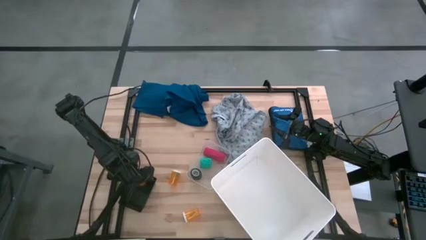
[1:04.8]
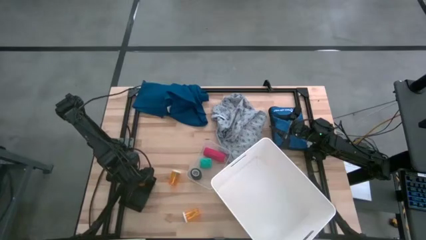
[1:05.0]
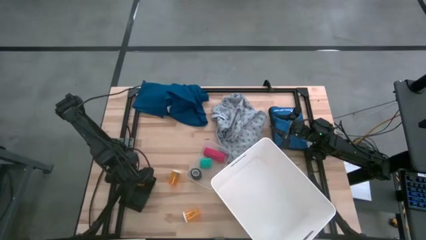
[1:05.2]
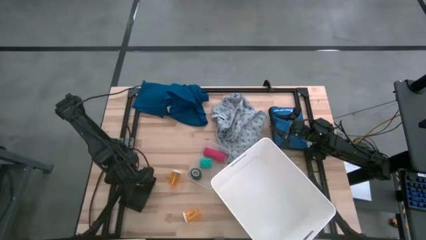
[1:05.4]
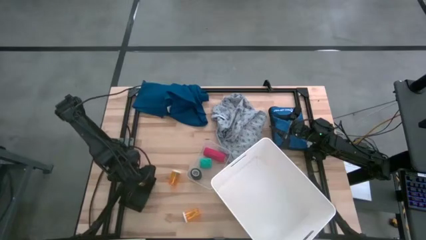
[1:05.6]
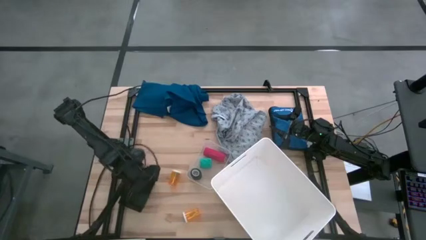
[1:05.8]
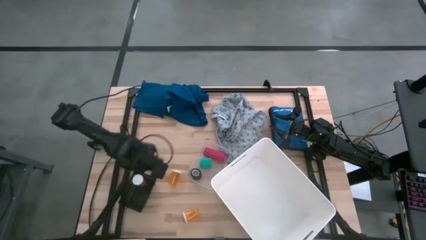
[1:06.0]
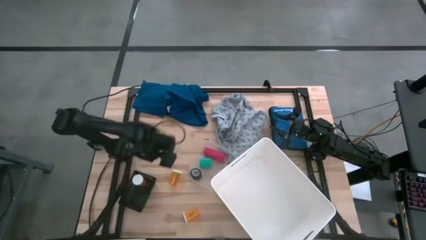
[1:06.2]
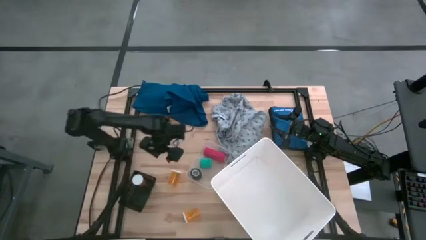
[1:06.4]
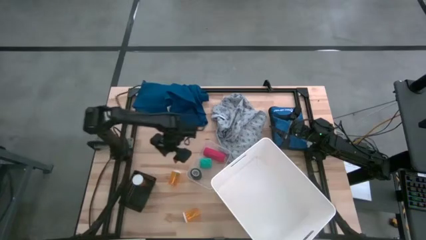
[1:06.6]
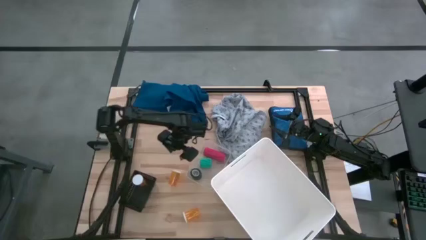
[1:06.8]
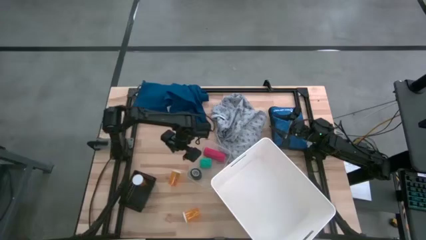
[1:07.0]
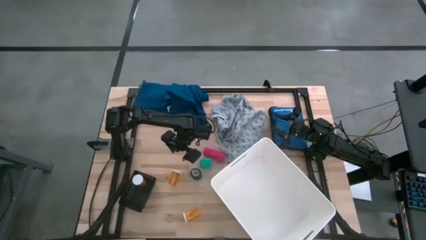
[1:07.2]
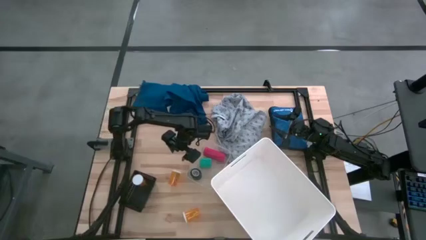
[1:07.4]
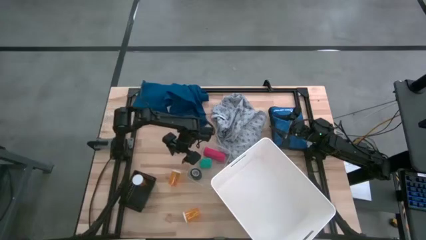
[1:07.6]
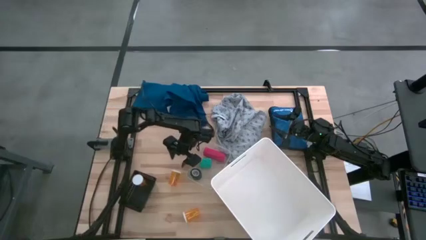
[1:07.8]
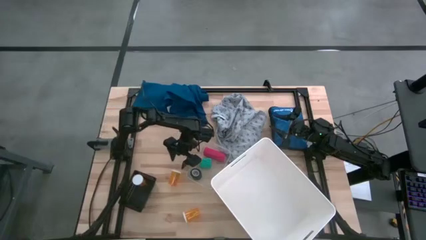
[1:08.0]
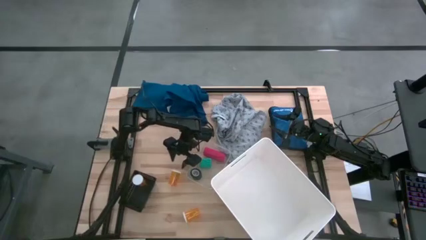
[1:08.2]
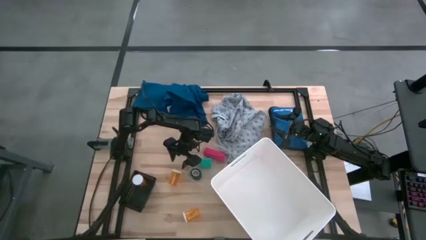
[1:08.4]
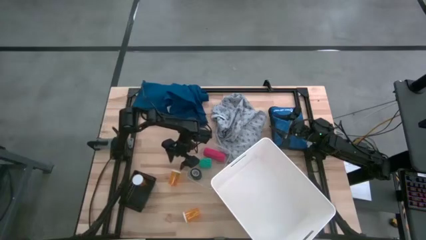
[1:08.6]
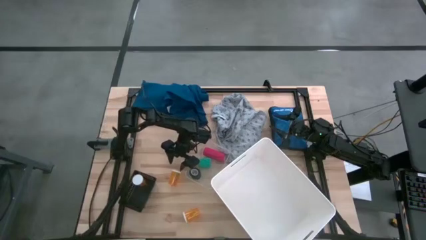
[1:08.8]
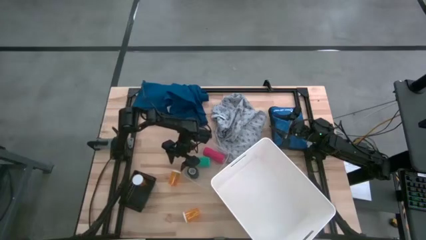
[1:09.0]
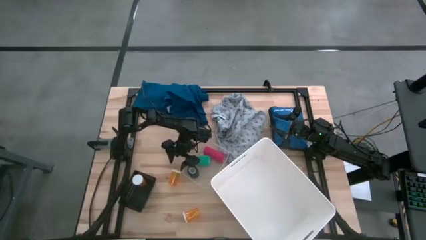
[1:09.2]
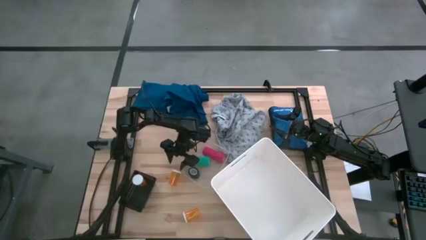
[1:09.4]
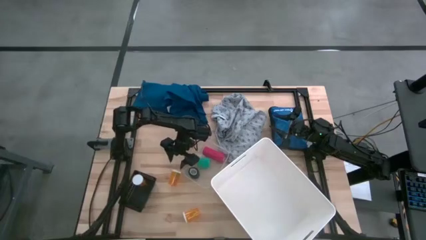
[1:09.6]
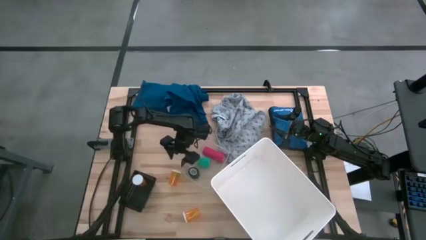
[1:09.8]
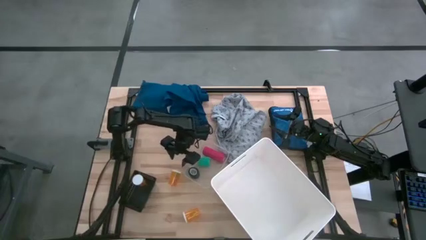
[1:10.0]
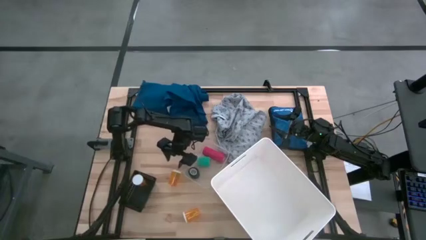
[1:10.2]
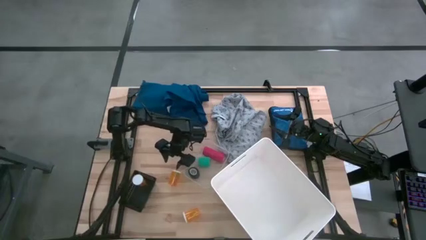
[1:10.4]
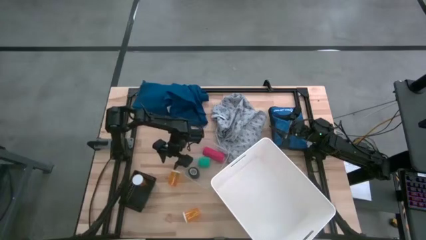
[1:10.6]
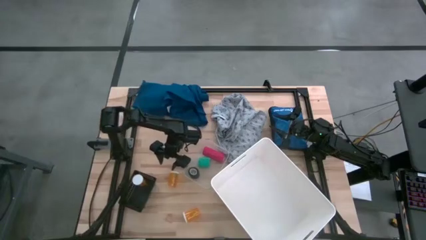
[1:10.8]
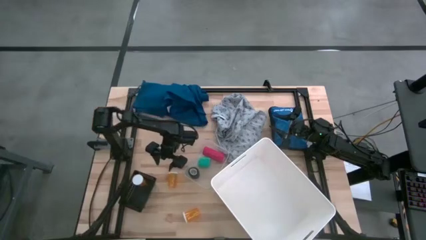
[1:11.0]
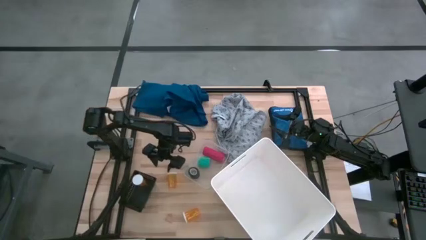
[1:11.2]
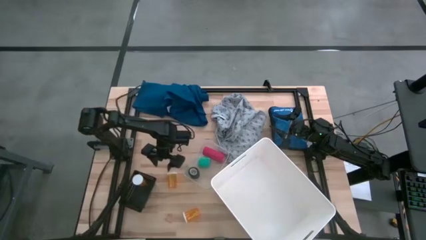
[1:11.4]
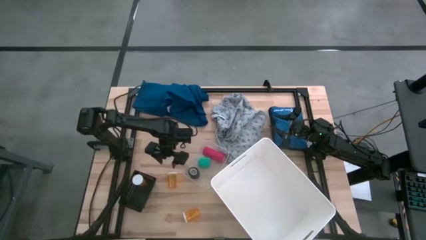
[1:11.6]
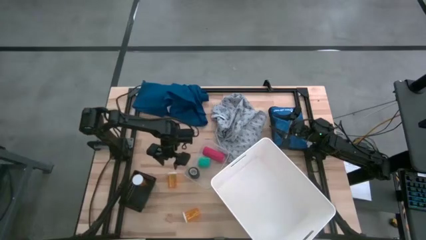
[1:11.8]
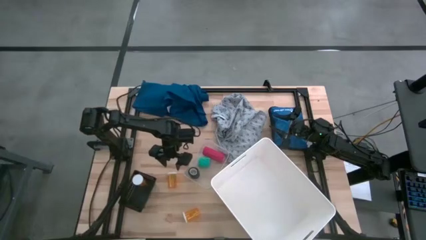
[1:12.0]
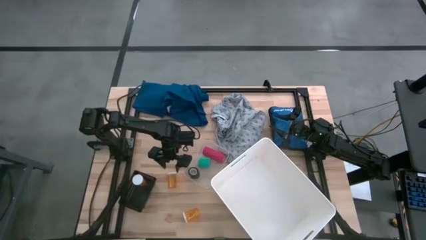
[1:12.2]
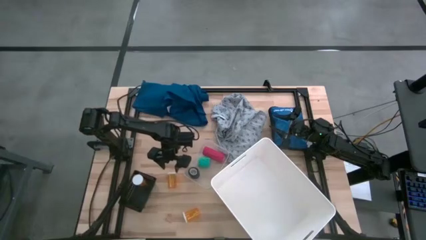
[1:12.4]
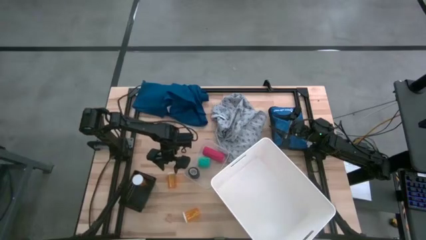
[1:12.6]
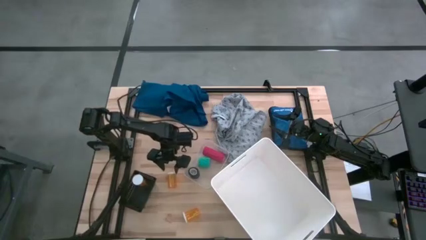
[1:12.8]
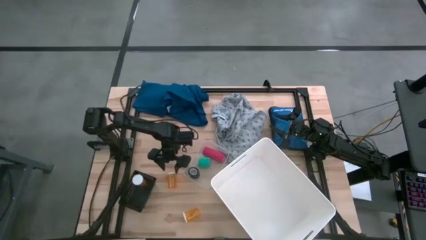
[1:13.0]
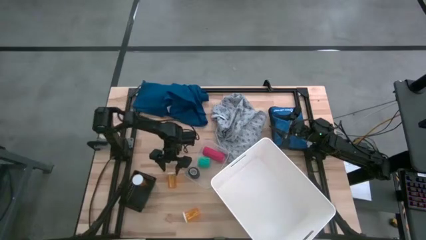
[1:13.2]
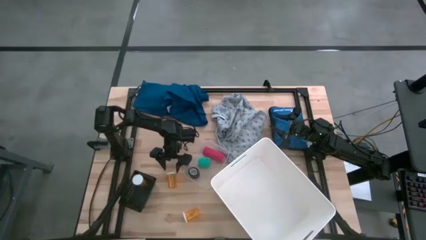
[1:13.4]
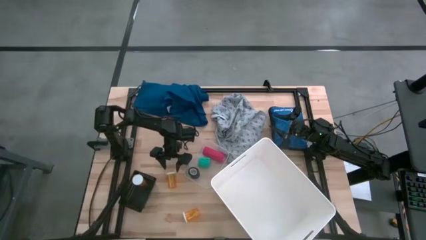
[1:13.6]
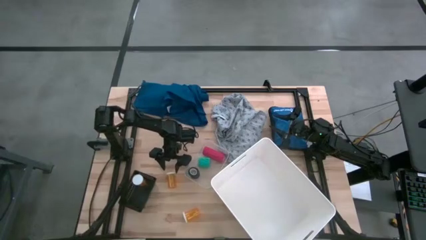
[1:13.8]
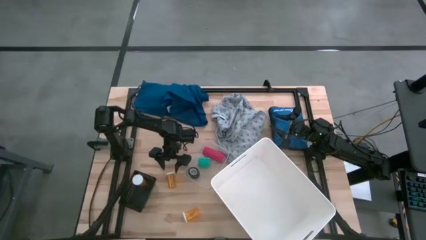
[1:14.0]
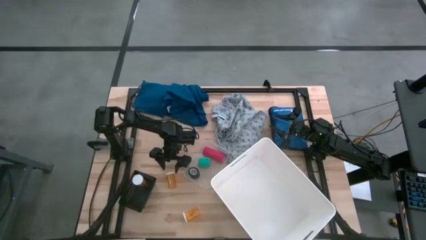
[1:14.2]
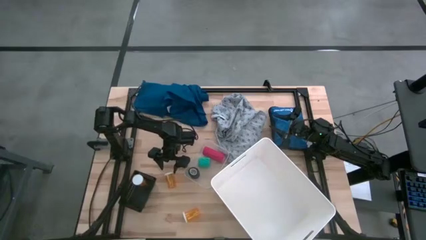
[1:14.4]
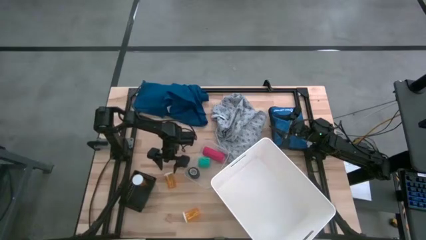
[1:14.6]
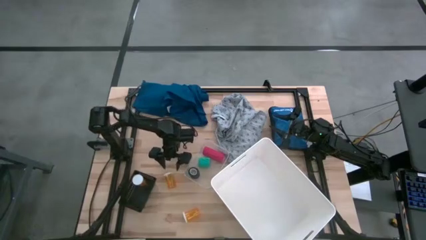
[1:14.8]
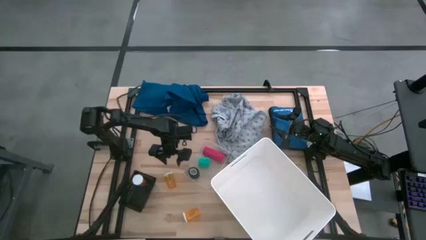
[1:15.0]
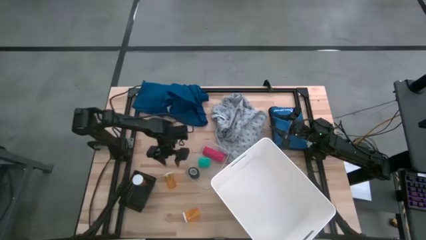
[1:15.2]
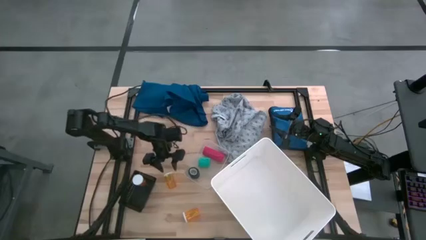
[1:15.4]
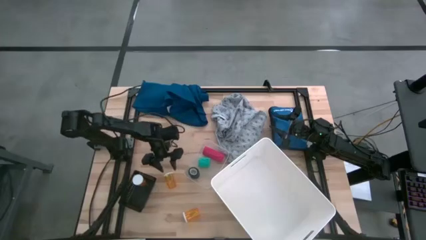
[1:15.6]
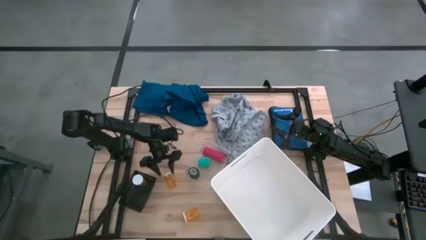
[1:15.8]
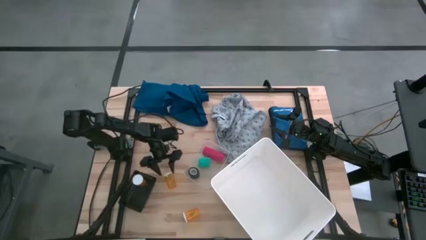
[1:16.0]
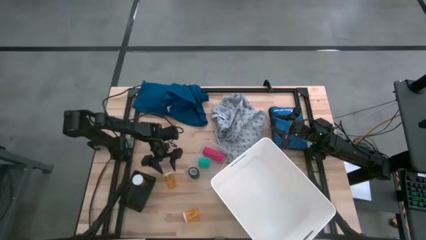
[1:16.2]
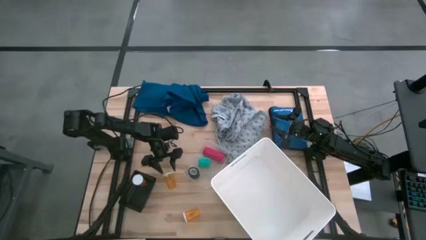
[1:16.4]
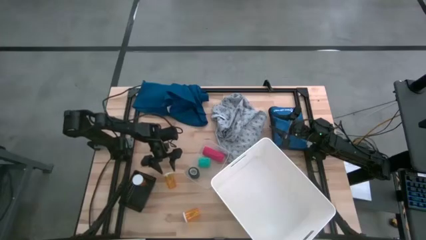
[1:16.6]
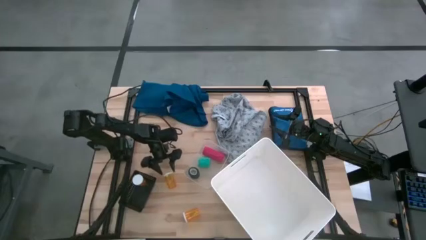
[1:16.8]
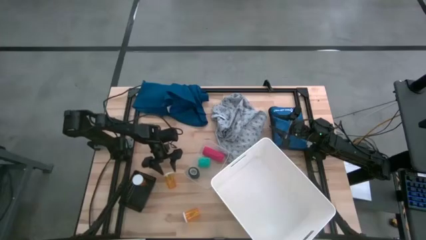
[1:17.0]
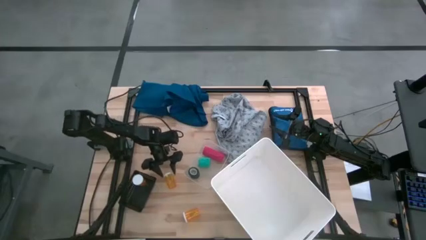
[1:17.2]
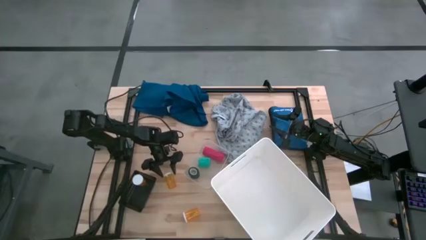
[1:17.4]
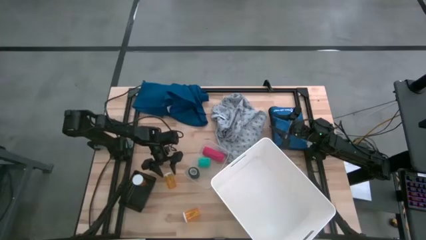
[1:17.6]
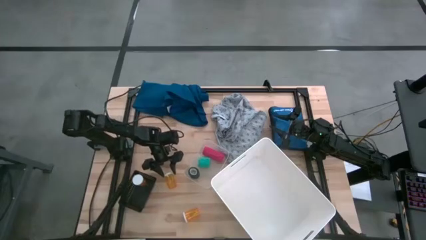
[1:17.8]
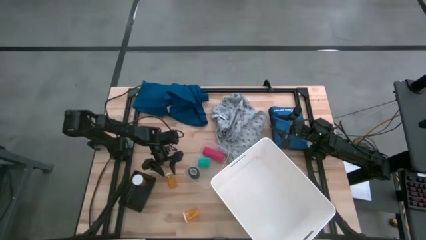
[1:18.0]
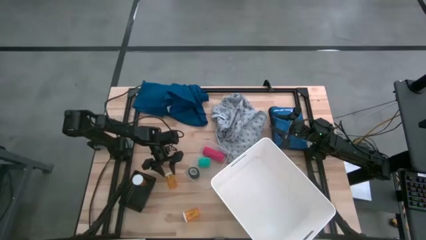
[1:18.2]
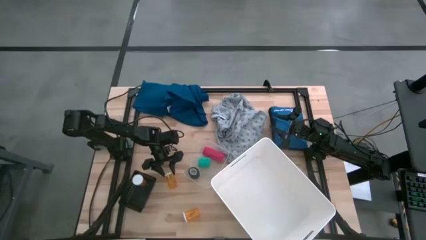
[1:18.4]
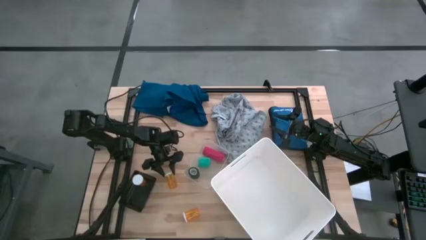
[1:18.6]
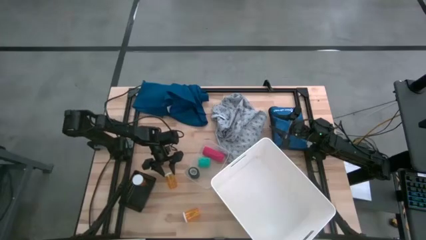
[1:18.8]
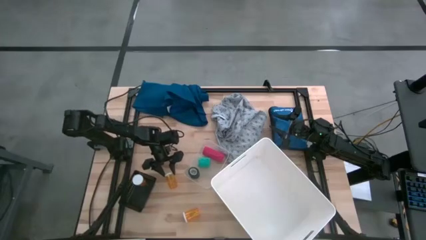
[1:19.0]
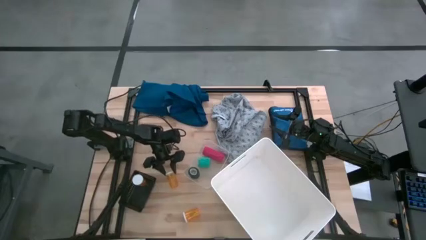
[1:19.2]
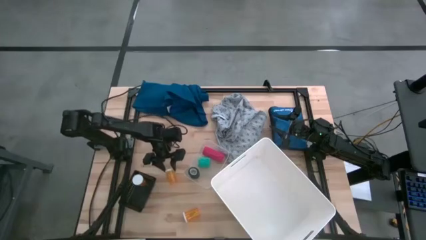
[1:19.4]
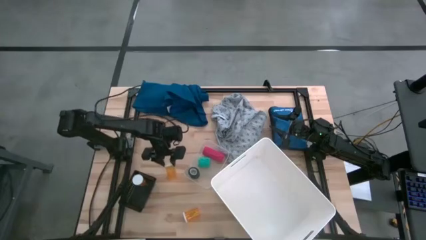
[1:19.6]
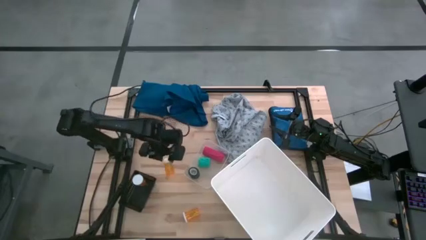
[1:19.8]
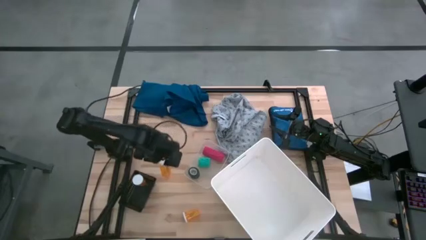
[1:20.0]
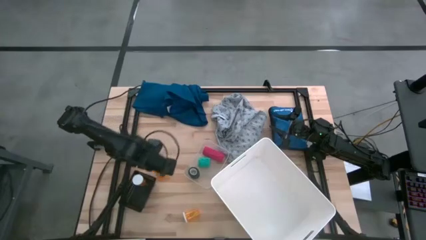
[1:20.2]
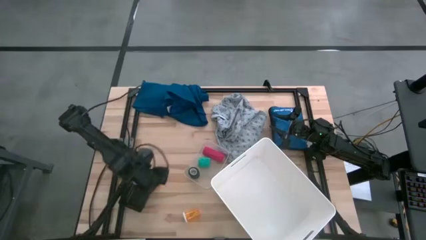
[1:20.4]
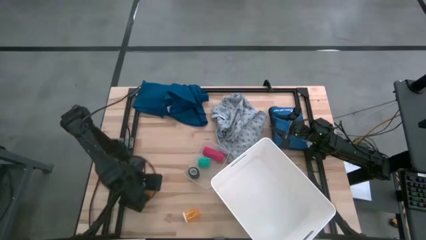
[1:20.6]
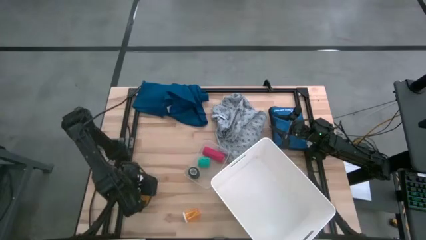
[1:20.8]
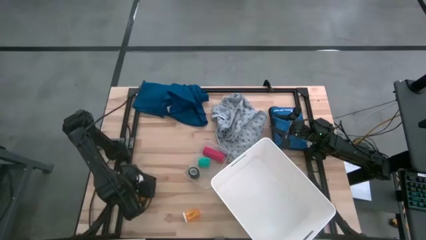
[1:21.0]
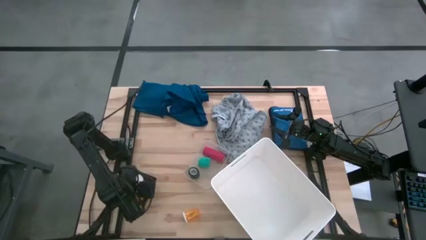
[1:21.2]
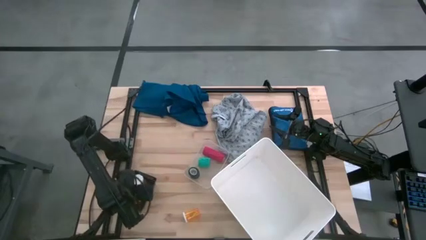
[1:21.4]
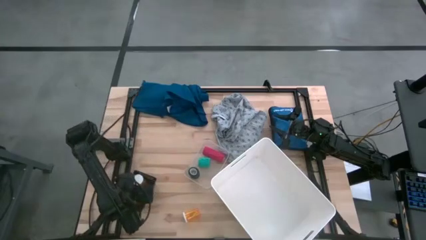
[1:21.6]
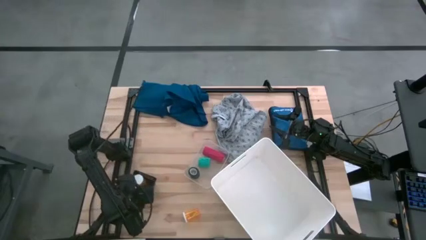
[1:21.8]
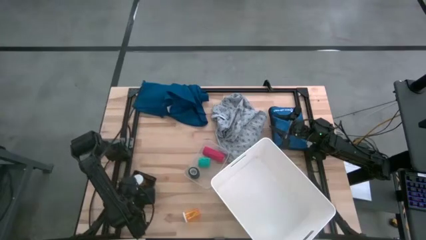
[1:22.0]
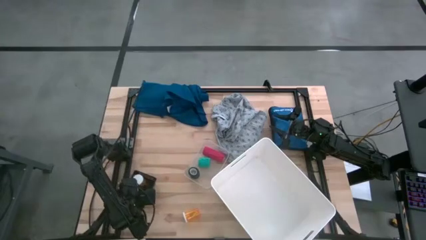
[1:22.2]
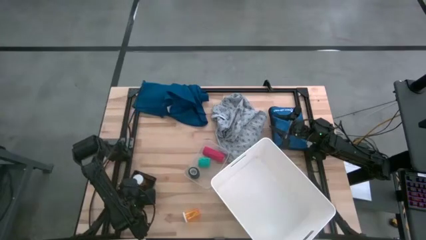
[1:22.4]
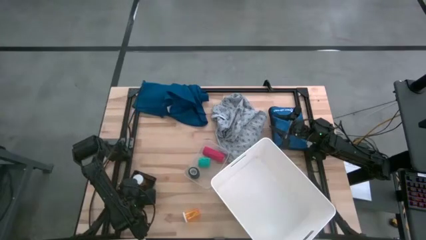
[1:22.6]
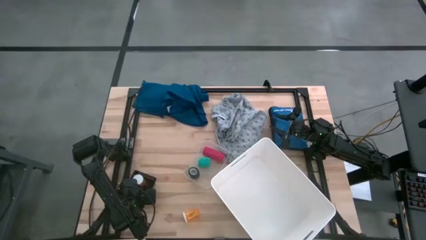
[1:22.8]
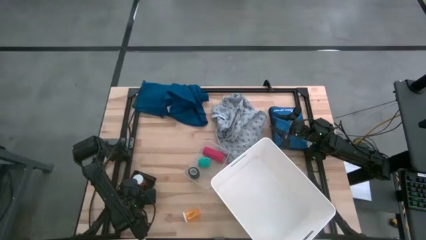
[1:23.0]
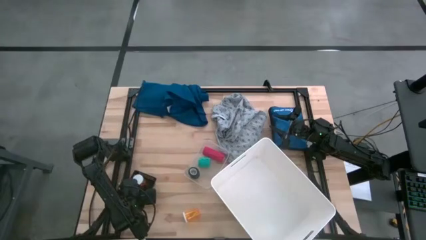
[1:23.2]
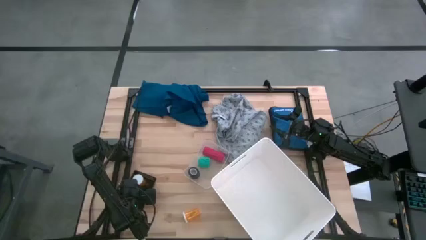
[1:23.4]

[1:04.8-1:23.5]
Task: Pick & Place Medicine items
Put the top orange medicine bottle into the black bin
